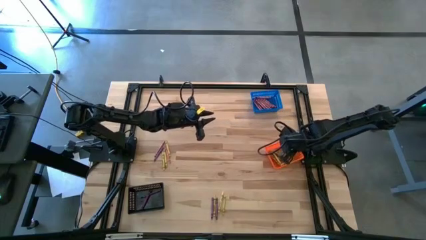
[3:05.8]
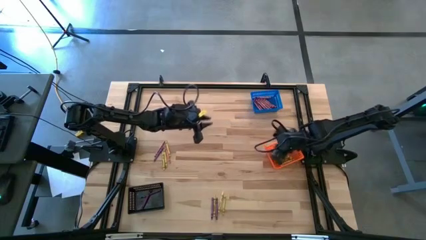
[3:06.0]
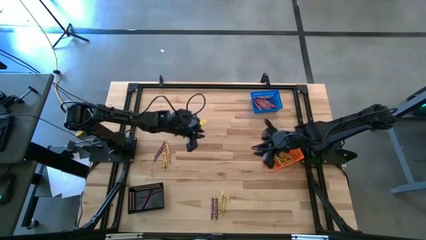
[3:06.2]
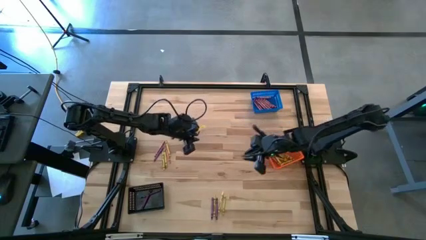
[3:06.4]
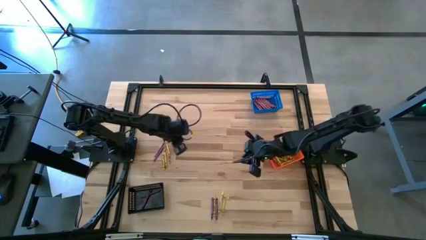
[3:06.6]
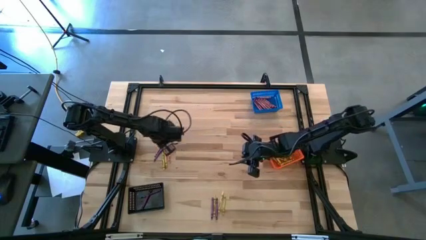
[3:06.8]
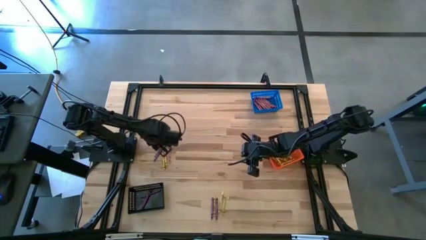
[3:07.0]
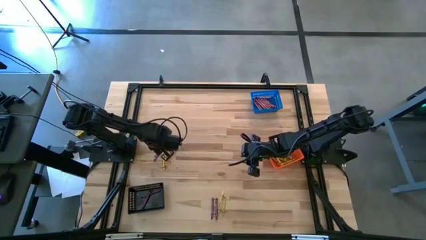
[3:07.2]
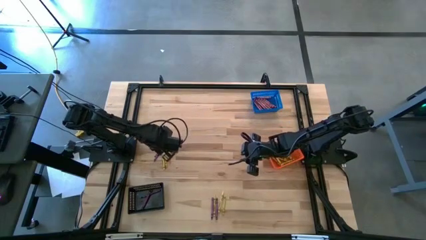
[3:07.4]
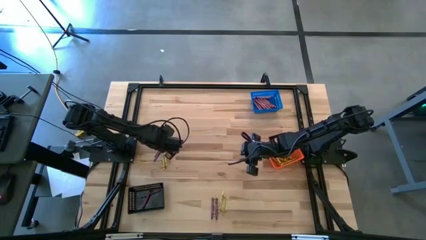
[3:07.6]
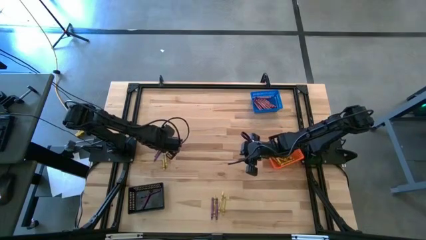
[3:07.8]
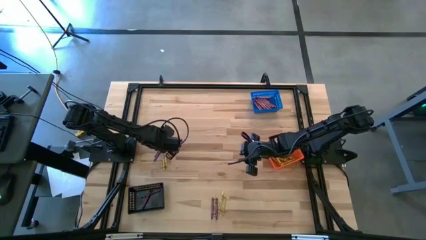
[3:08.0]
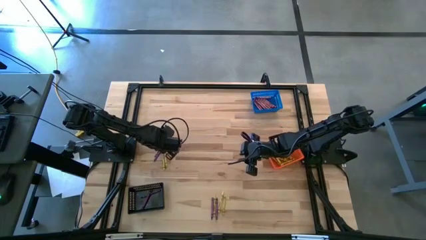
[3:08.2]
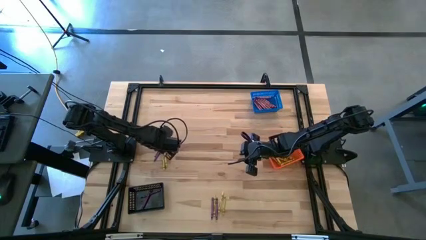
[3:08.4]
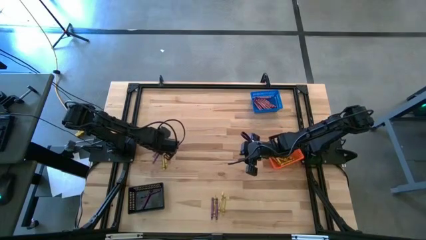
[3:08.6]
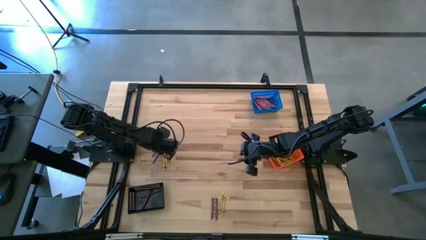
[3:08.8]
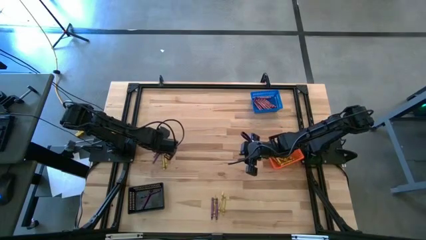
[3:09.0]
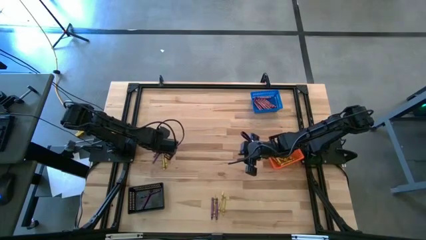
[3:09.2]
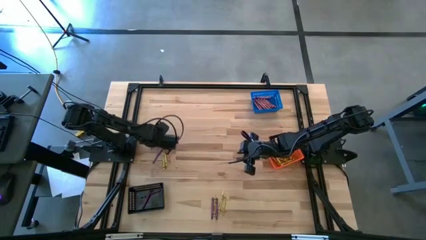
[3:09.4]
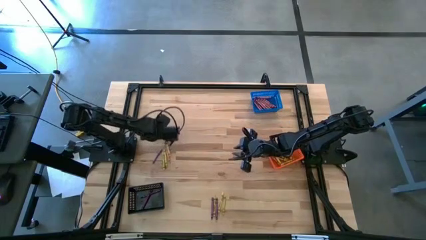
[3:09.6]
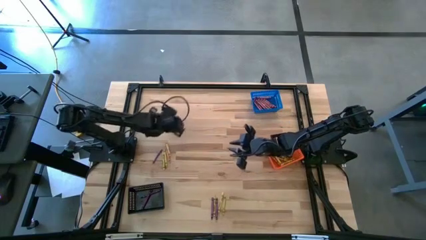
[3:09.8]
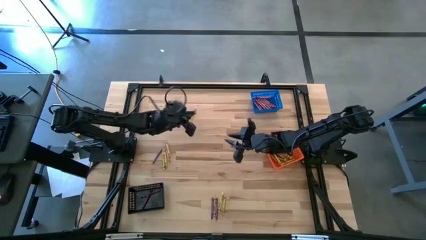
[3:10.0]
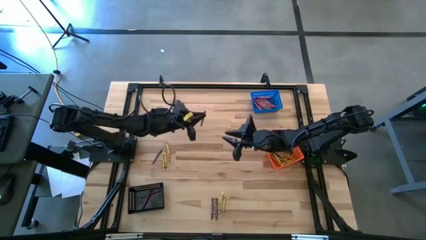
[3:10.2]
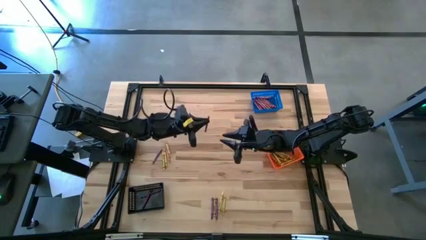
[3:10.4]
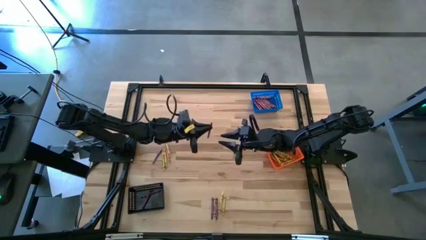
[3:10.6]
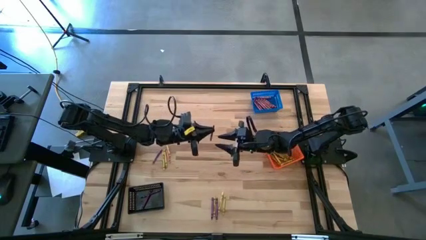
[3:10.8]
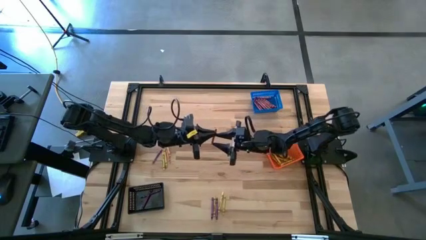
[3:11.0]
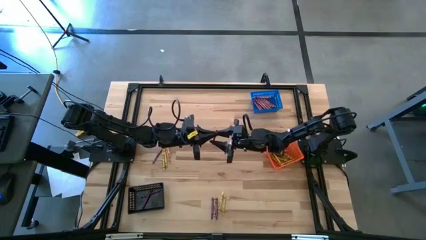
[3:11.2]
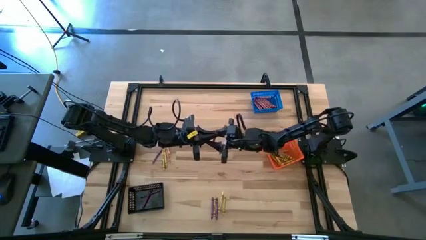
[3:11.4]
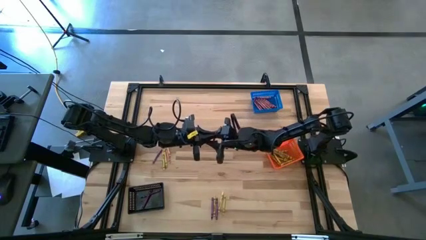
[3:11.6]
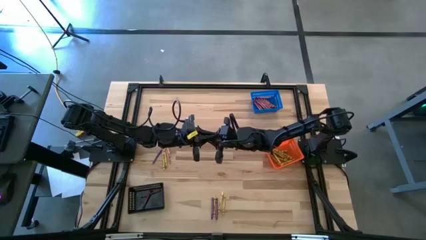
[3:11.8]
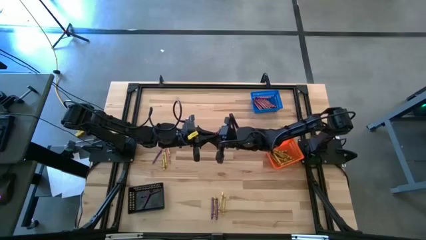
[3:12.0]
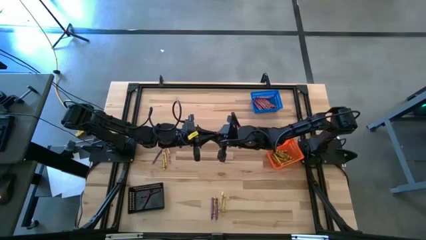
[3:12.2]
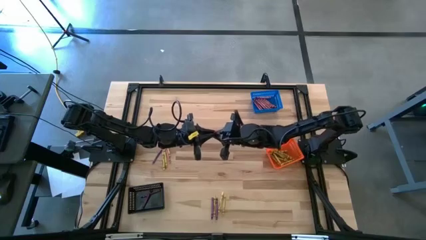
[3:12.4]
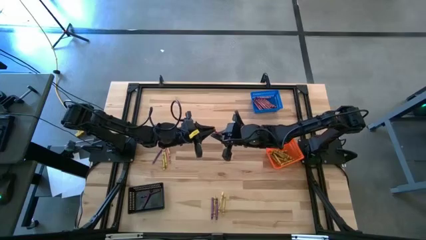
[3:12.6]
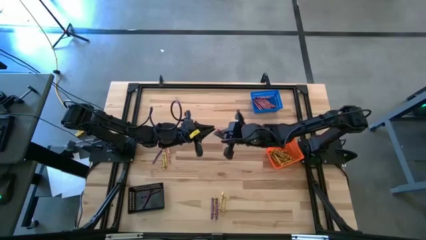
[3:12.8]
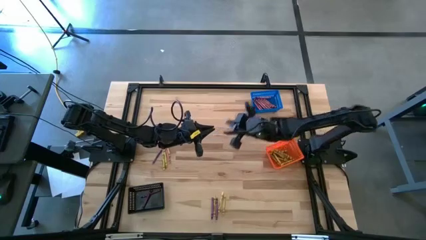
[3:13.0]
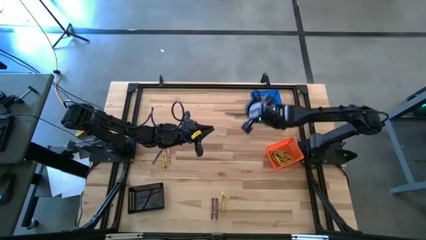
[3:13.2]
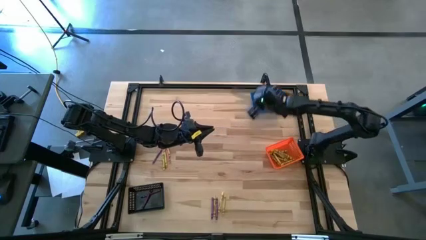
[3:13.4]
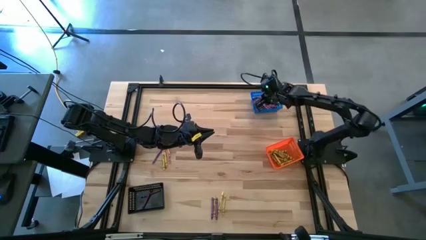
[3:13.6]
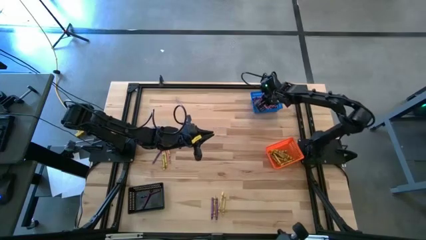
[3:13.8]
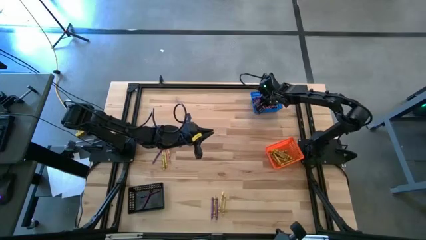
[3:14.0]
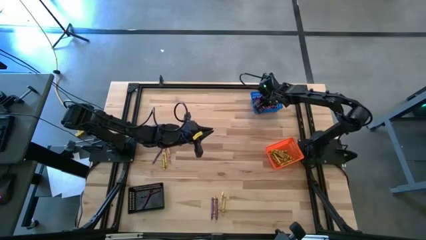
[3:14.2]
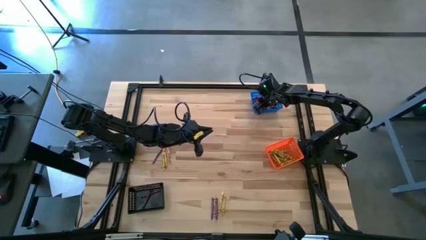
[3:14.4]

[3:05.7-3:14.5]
Task: Sort crayons
Put the red crayon into the blue basket

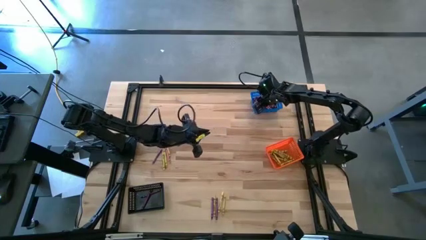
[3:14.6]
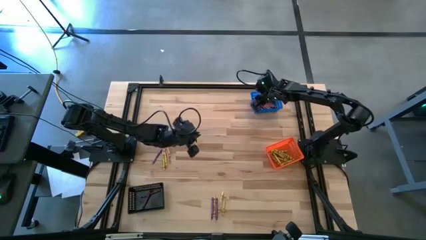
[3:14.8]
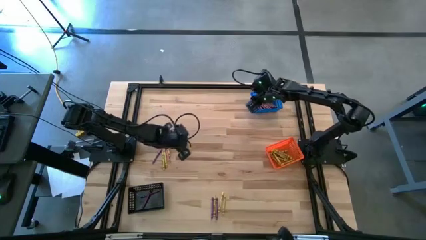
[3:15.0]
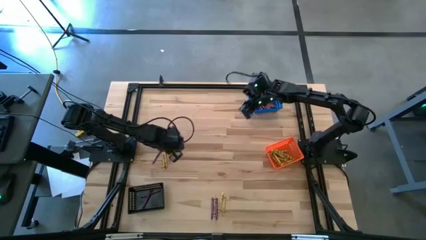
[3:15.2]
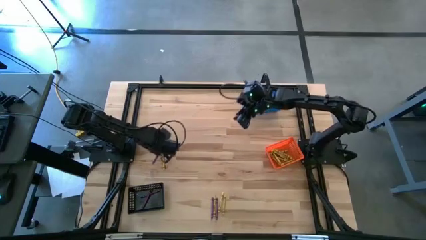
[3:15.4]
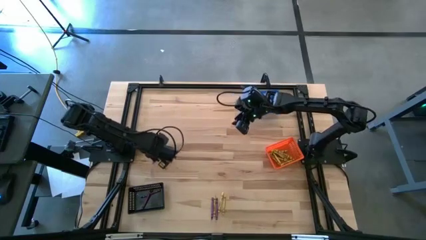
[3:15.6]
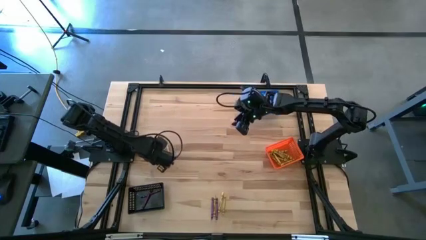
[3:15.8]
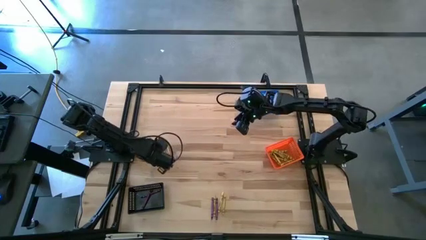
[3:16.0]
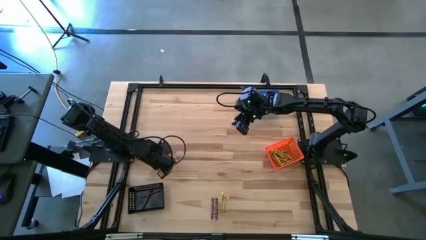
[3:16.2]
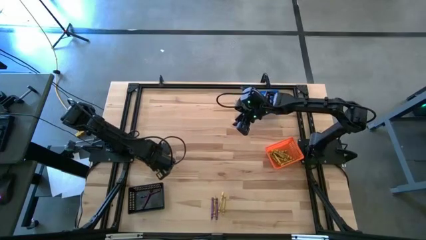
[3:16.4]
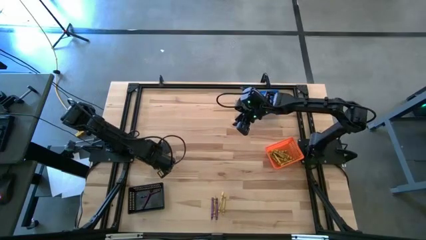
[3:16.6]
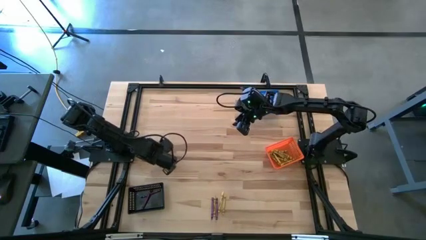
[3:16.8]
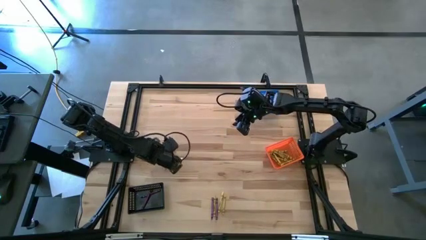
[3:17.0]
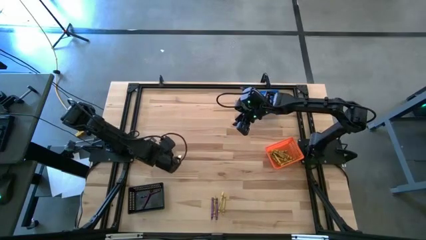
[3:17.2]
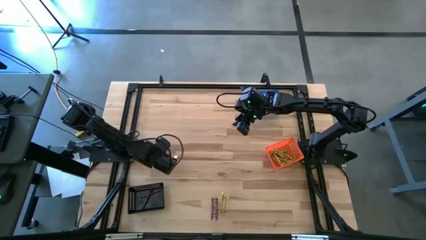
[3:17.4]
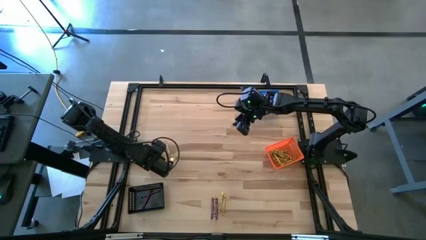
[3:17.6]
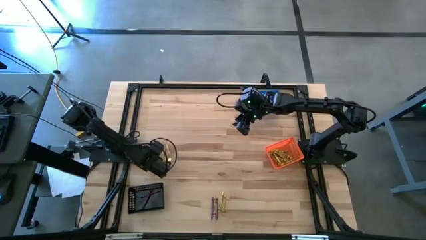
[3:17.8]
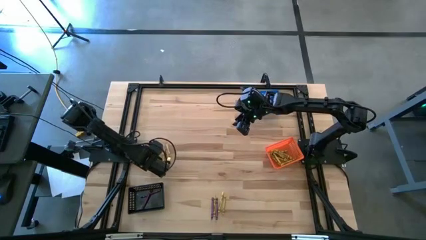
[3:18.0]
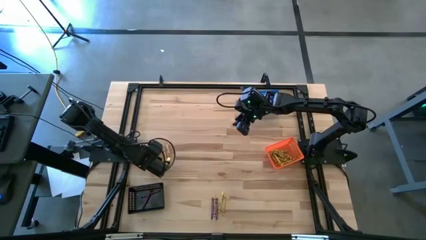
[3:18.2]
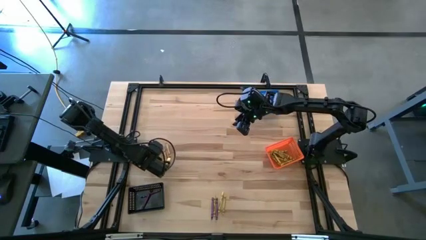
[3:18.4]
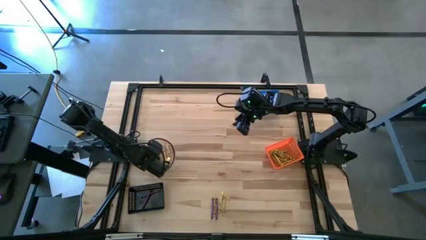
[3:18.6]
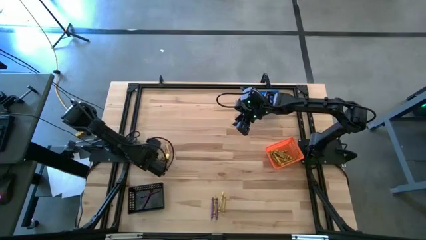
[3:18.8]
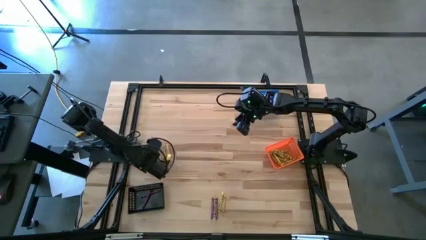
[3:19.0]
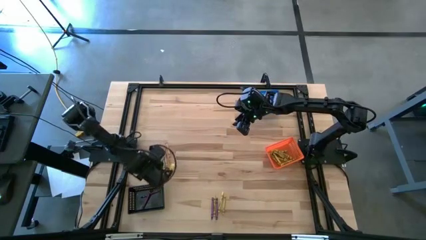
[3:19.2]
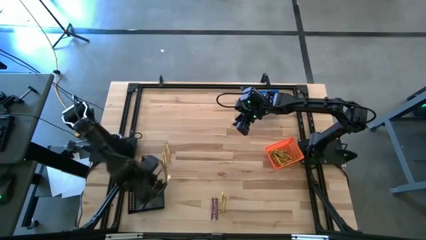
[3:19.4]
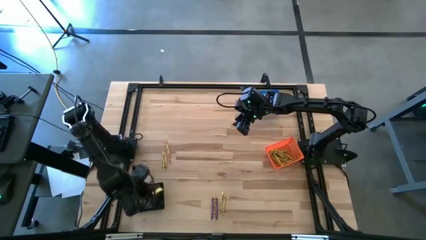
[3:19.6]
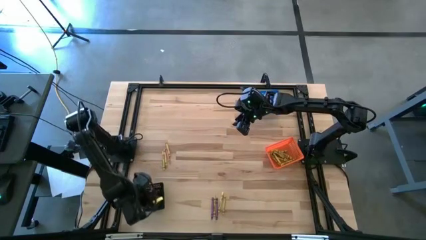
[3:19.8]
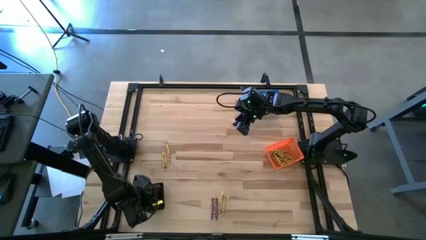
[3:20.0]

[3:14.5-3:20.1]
Put the violet crayon into the black basket

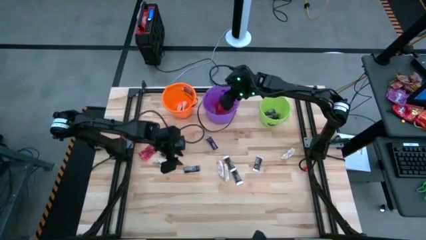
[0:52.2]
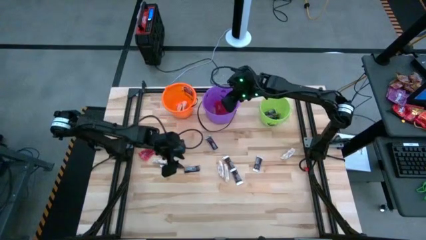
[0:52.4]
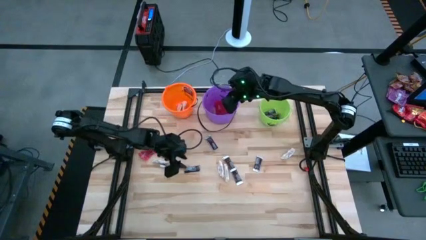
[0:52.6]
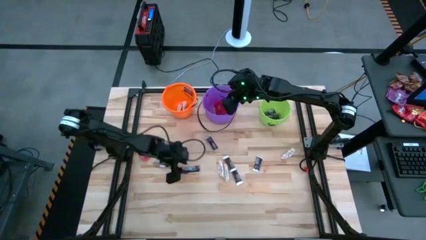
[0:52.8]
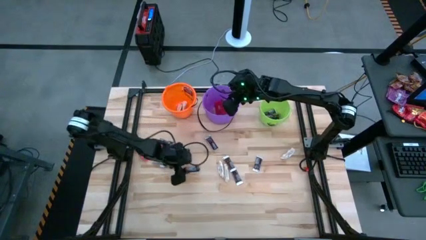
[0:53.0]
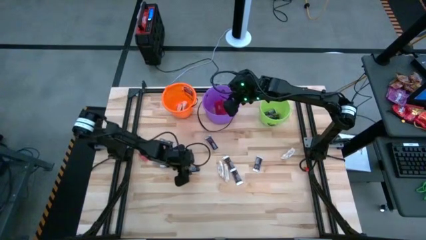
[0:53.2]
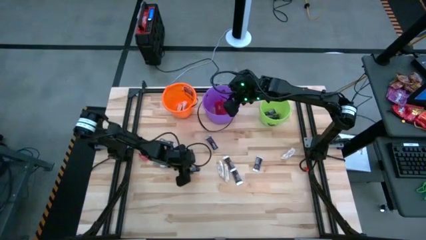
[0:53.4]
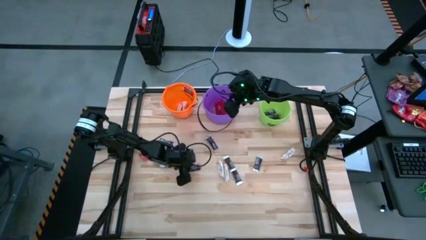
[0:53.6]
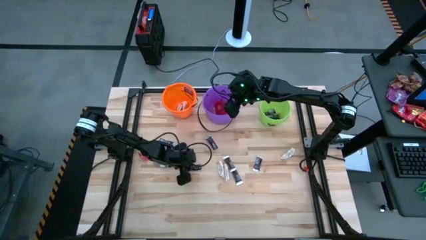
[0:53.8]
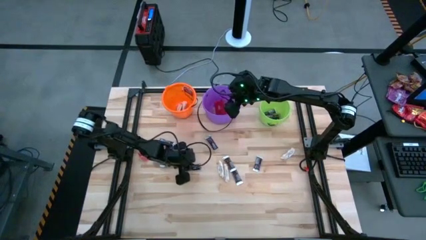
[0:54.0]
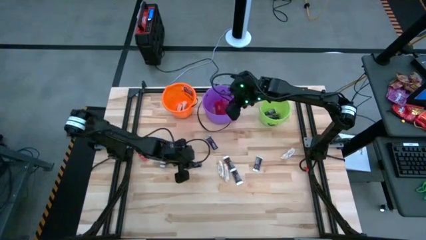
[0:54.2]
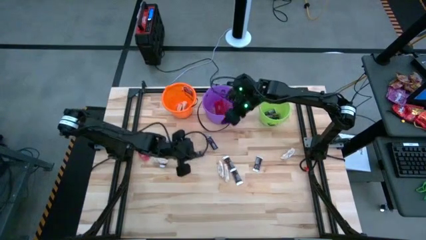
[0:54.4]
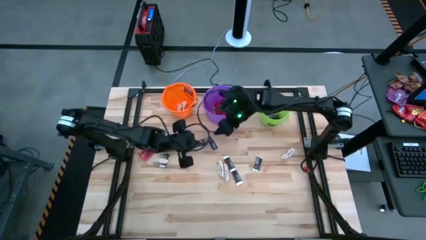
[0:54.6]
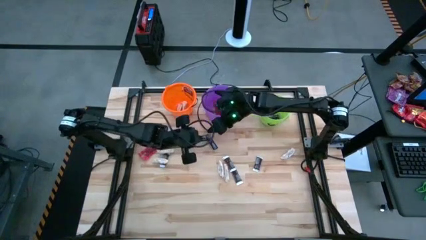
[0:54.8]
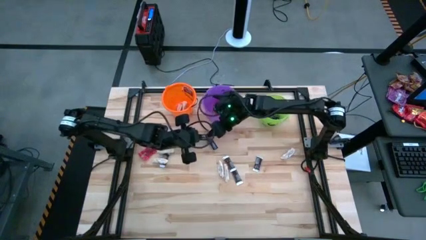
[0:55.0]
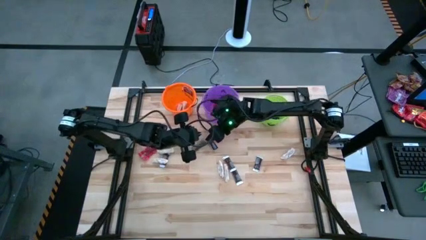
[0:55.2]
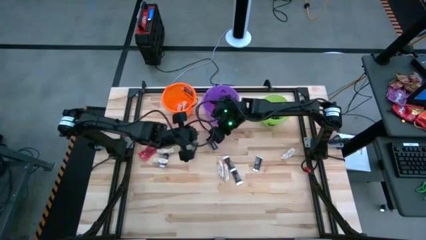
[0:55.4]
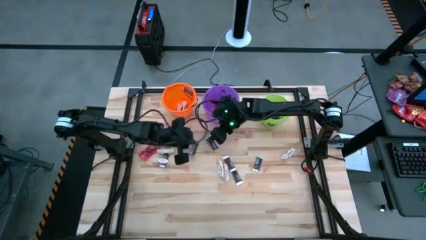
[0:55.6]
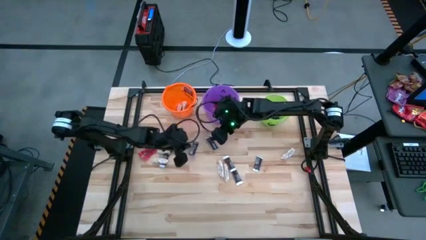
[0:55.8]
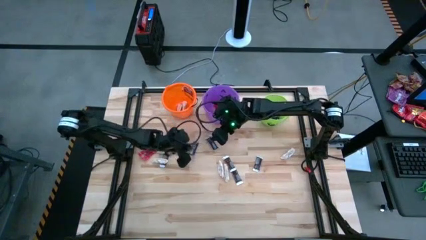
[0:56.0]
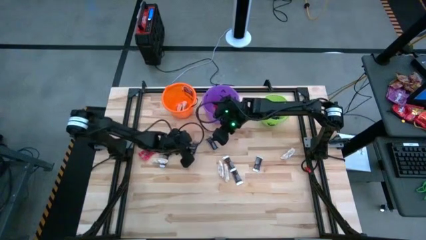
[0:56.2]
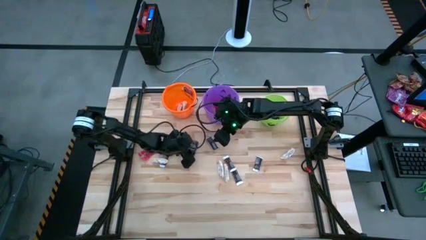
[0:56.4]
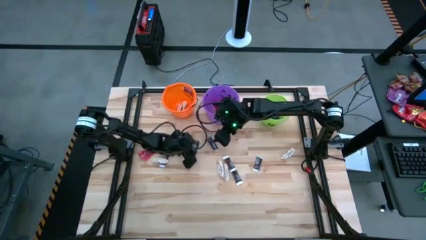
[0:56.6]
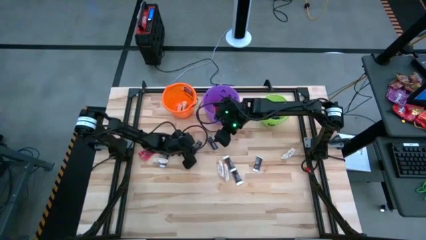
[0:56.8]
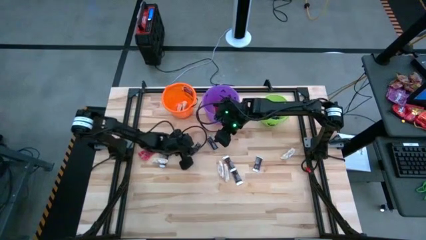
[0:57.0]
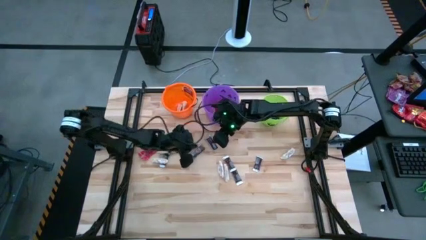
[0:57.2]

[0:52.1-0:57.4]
Task: Sort candy by brand, put in halloween buckets
Put the brown chocolate bar into the green bucket
